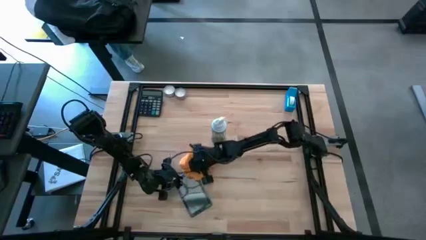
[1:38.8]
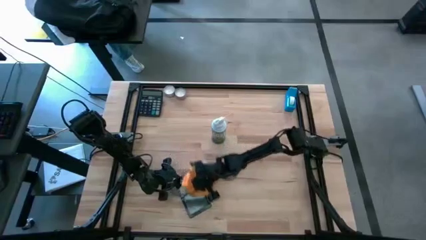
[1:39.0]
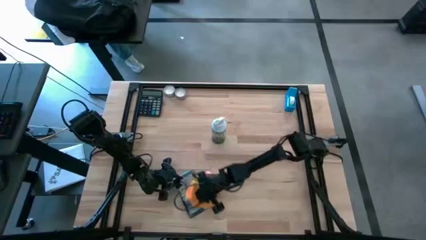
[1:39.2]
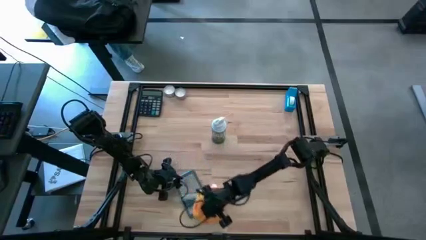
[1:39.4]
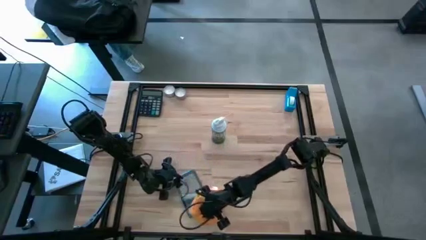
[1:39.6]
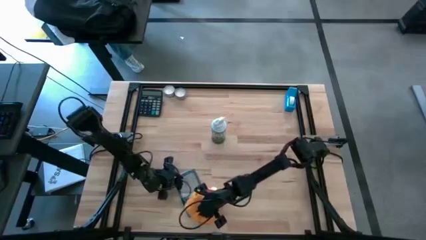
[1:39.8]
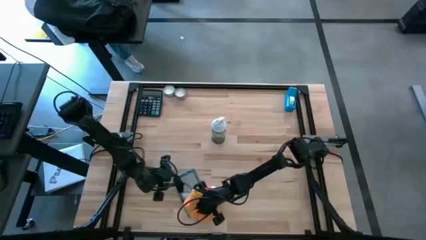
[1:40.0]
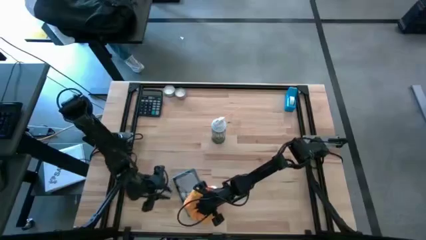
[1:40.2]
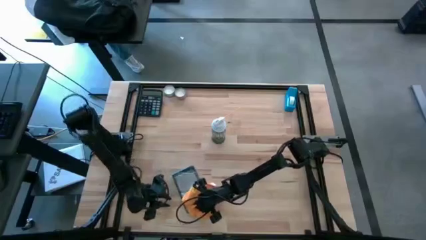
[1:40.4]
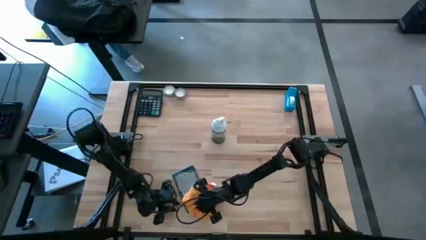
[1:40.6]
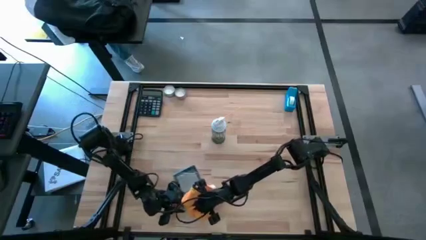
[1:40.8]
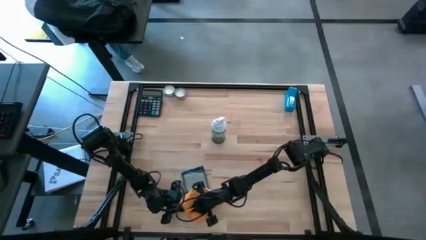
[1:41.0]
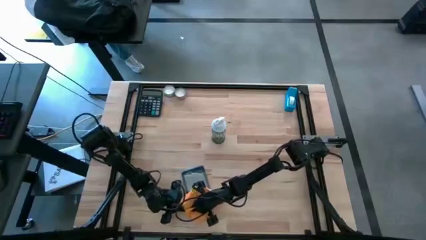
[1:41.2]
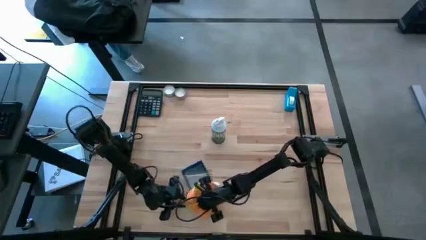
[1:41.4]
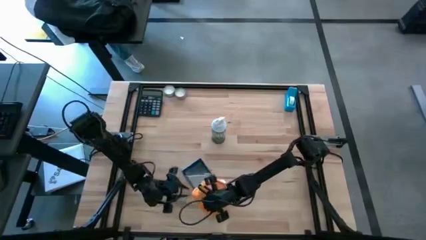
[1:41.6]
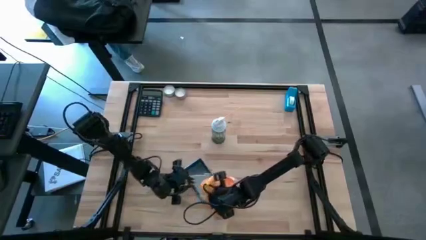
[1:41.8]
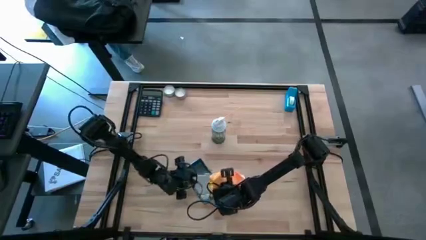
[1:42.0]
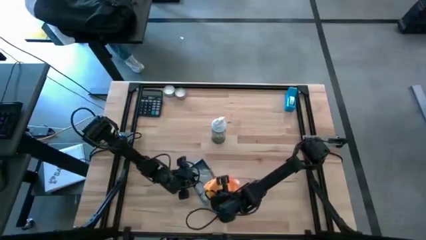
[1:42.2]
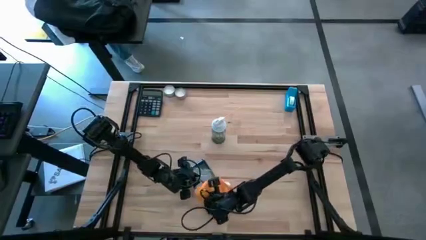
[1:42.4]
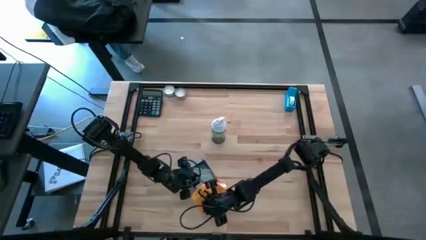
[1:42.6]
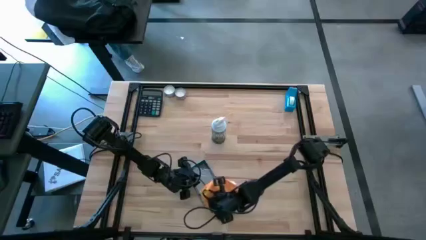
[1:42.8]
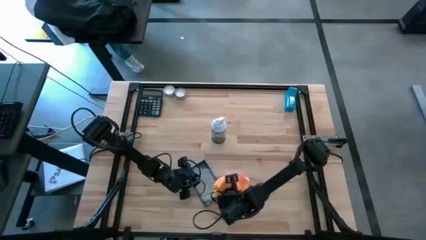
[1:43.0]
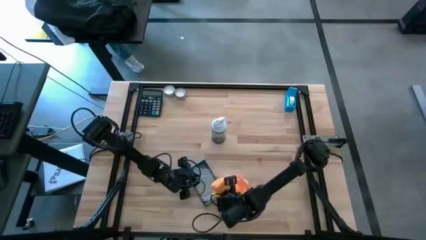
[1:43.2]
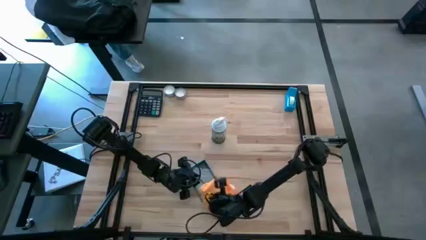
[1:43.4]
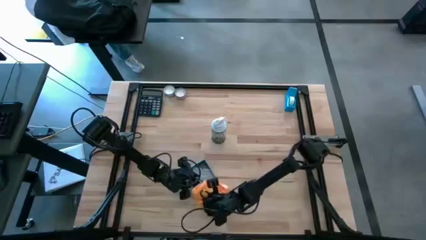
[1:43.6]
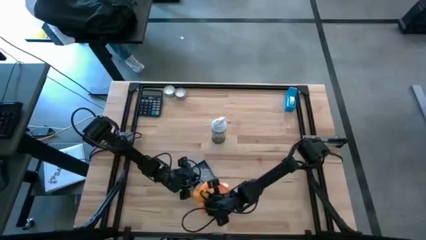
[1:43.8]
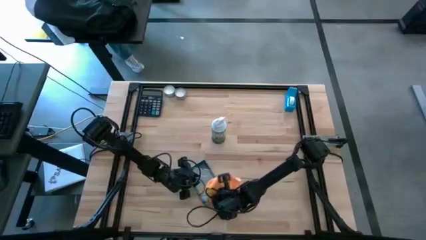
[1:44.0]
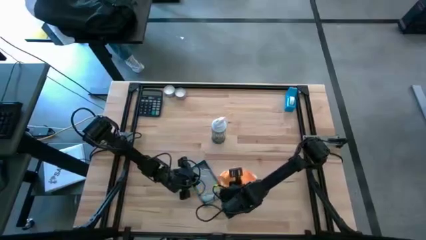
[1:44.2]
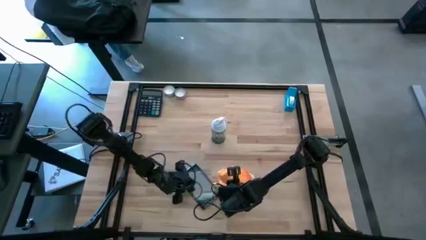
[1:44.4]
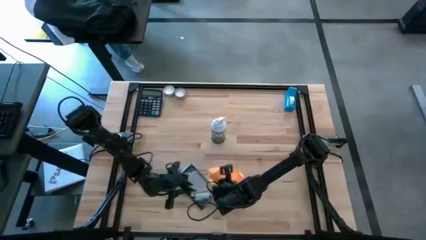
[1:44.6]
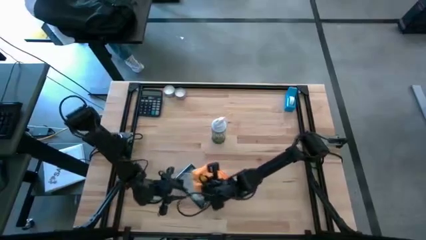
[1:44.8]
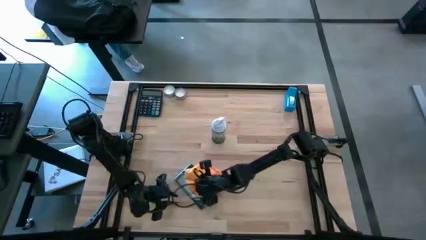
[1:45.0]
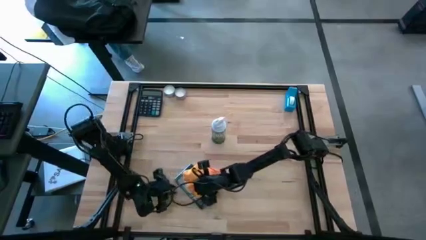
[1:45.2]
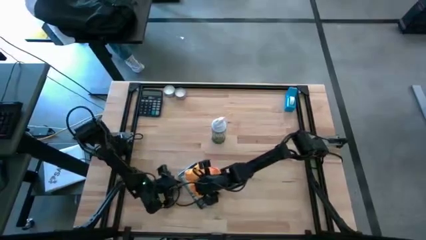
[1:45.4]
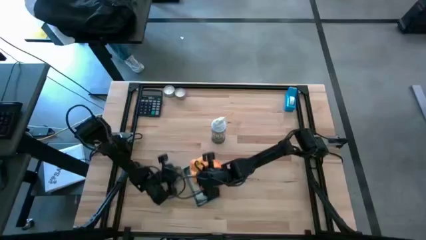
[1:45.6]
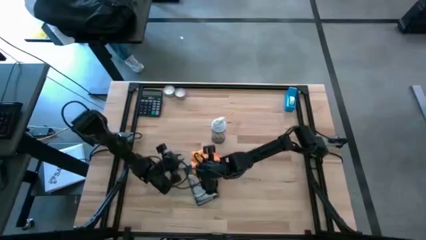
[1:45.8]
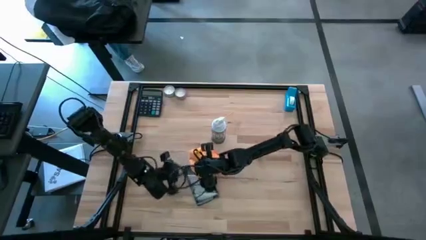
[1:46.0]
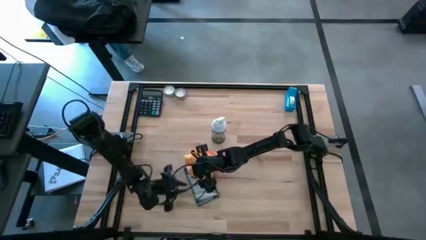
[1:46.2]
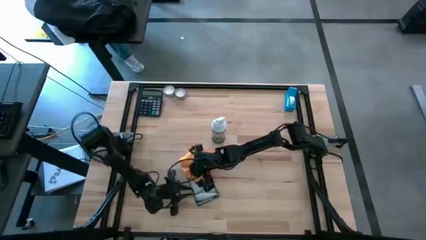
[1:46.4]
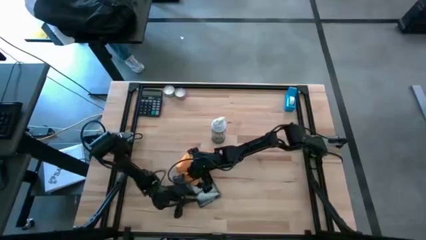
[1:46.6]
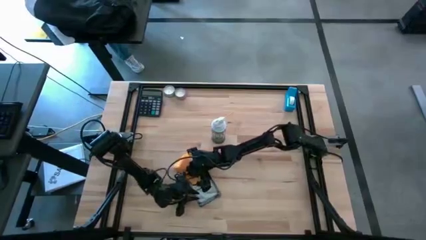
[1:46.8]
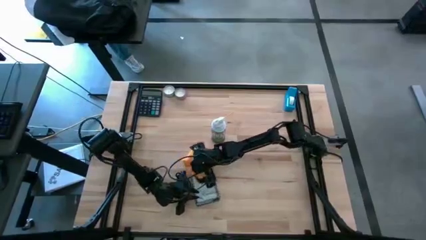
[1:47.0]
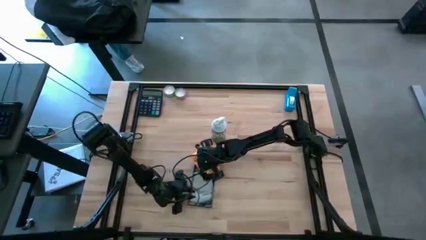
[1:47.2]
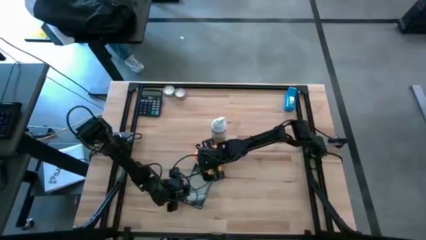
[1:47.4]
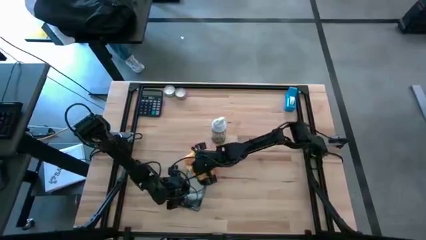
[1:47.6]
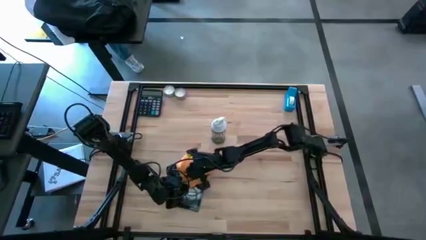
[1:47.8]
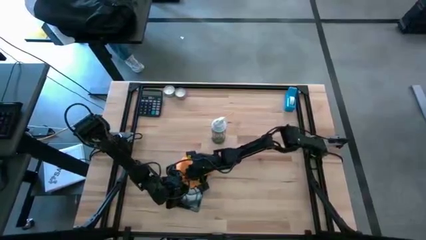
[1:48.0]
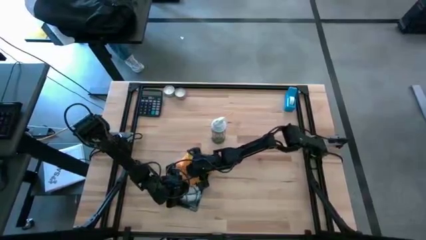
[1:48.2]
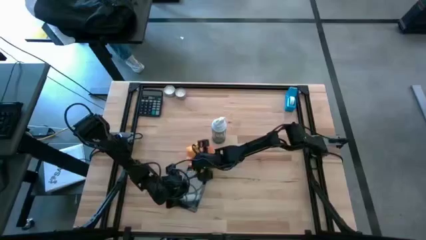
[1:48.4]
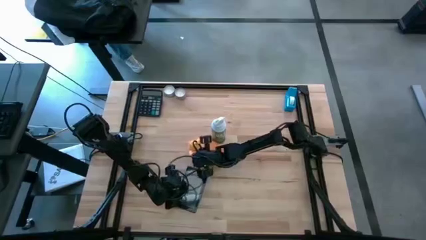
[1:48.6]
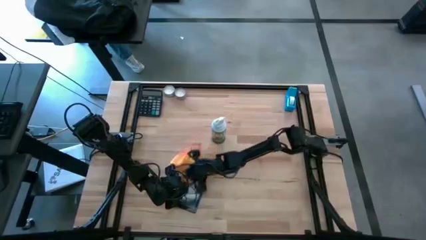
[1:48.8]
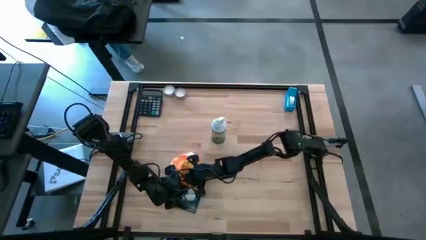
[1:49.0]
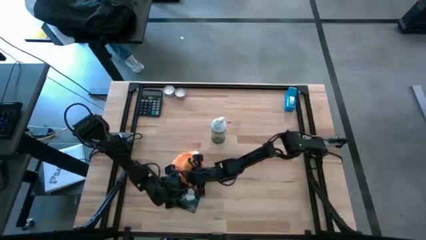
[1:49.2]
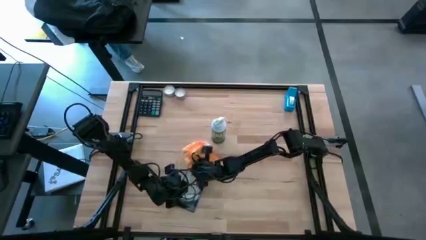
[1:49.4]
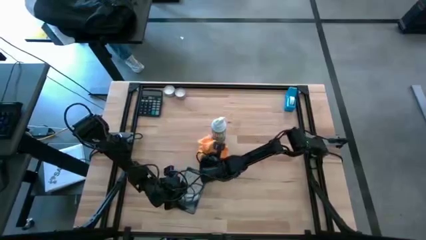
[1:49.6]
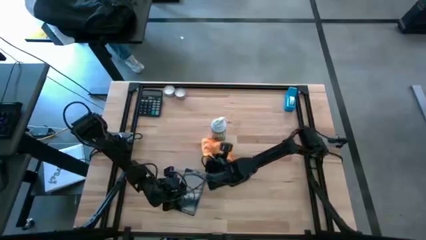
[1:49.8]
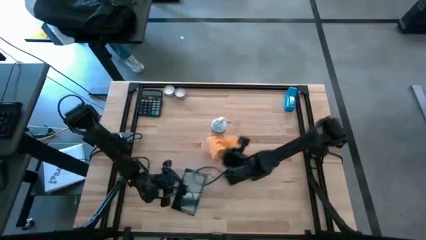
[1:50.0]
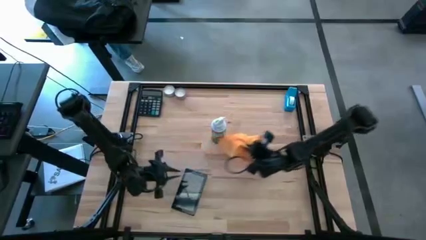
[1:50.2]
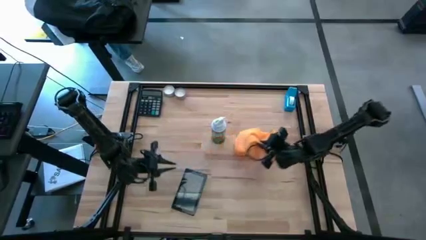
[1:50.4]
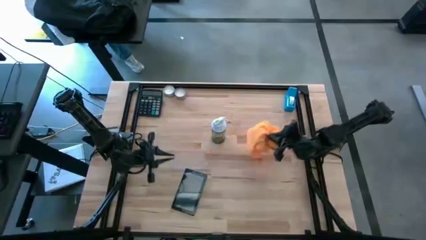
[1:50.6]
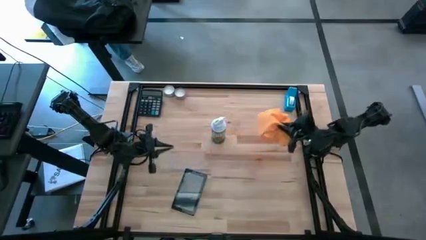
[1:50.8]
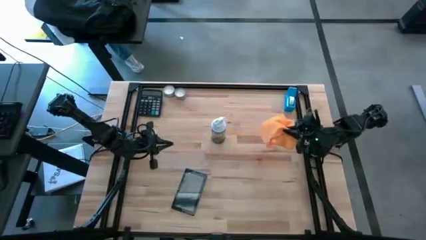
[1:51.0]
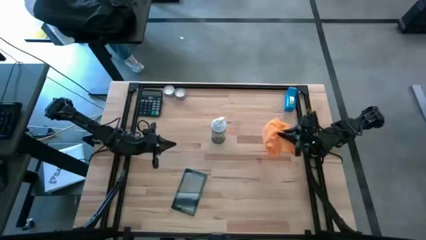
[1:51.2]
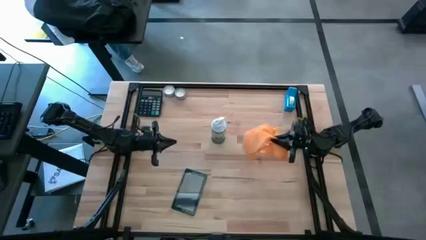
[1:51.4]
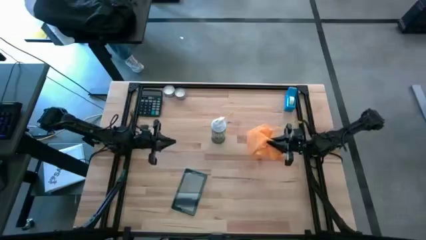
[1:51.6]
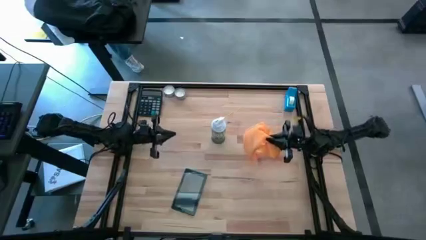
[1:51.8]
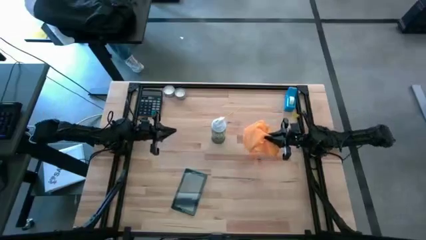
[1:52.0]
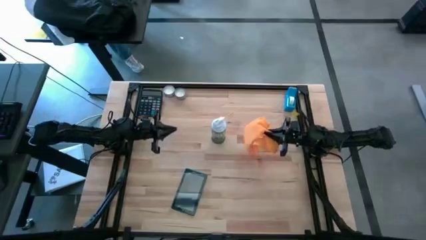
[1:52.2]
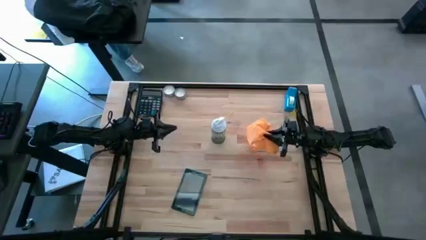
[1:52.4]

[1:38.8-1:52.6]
Task: Apply microfiber cloth
Wipe the front of the blue tablet using the orange microfiber cloth

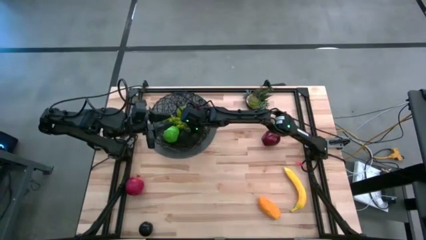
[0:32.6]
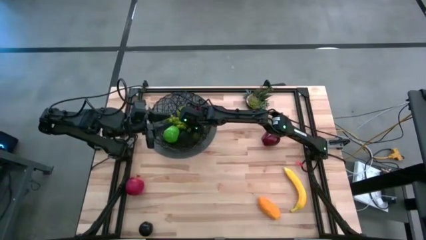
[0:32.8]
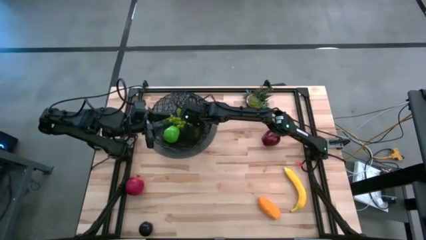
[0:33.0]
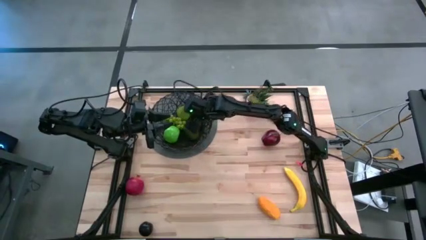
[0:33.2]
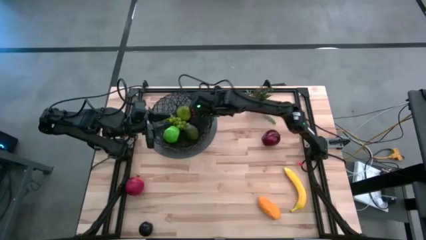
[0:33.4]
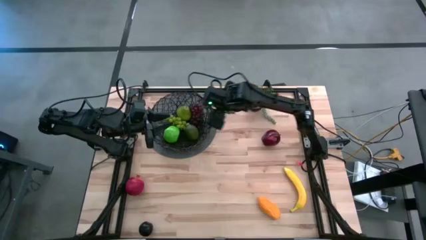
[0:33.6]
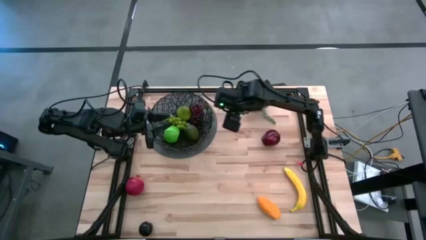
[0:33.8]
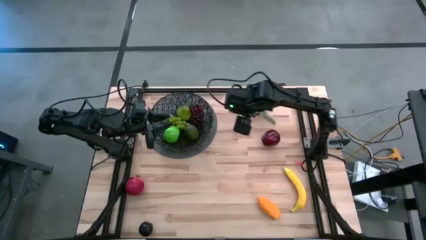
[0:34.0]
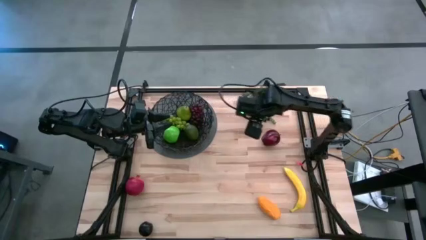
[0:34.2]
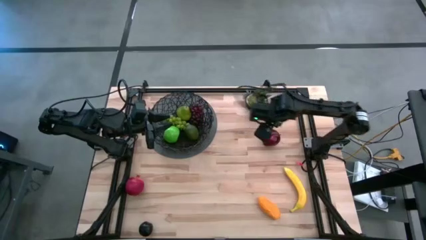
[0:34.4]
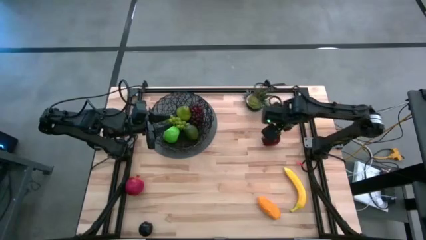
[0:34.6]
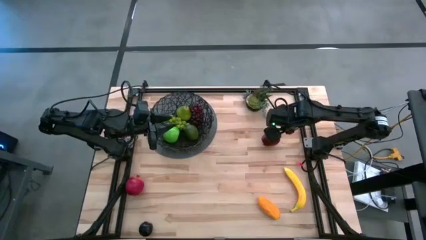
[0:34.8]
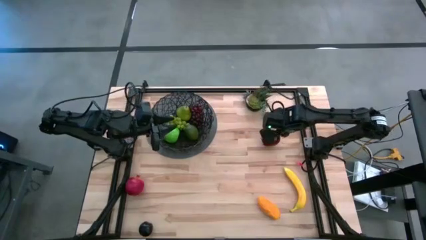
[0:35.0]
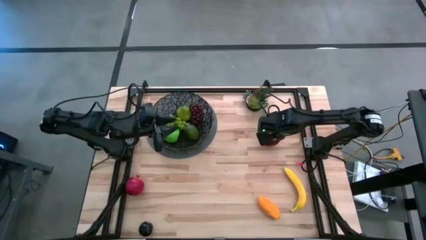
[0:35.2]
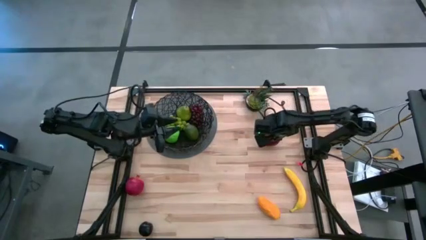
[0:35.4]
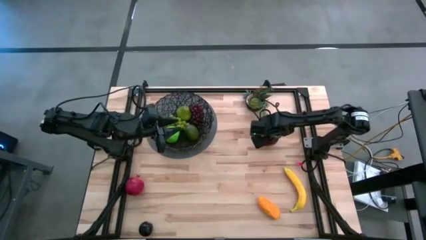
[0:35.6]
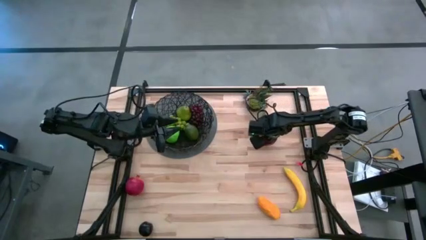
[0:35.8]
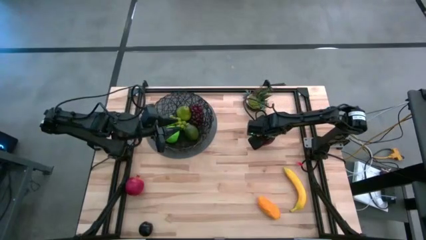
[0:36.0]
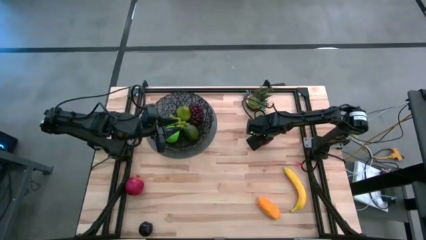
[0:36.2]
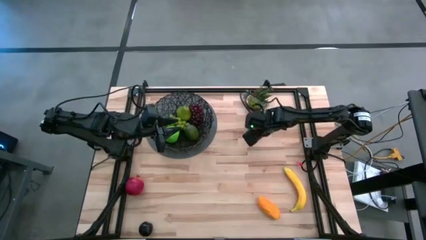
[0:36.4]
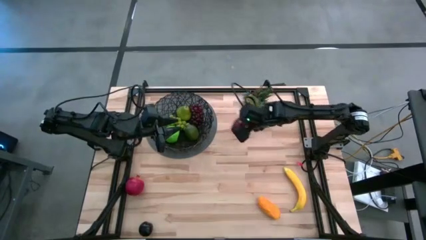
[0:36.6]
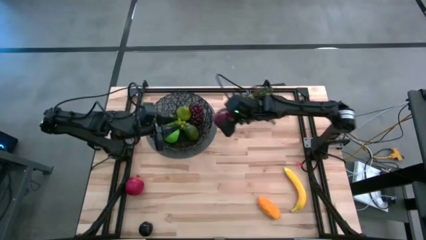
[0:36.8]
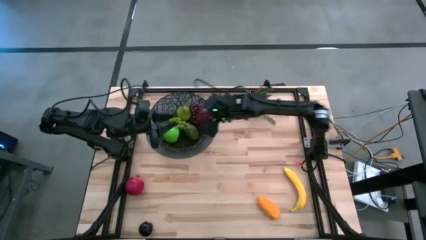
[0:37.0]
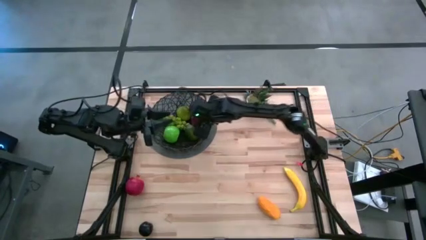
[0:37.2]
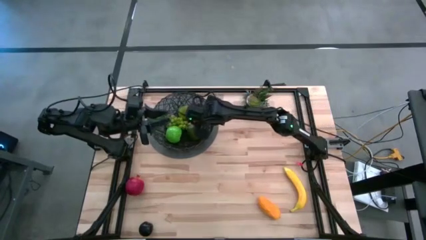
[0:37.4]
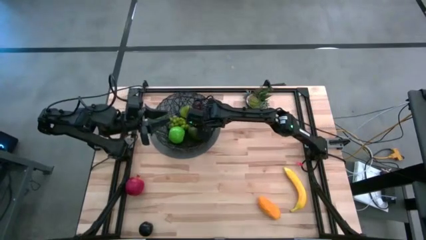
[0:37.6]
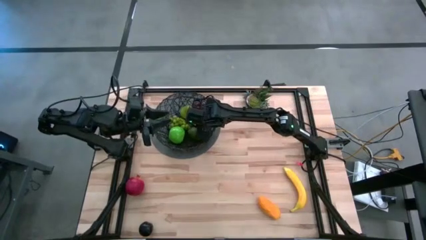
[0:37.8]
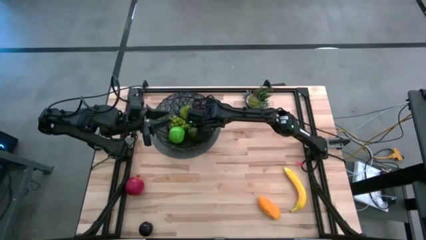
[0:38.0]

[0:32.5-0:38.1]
Task: Build produce basket
Put the red apple into the black wire basket
